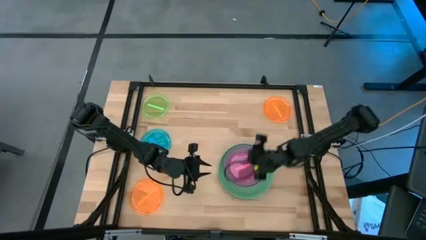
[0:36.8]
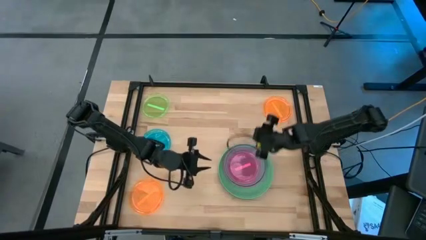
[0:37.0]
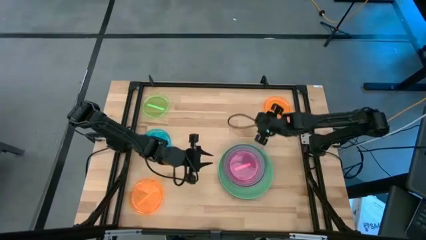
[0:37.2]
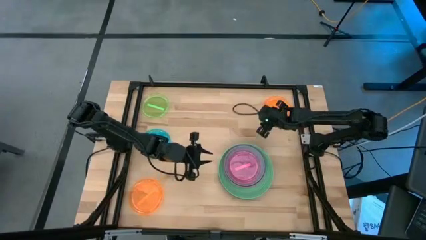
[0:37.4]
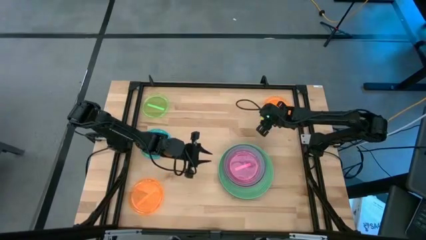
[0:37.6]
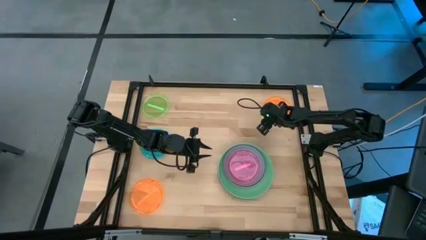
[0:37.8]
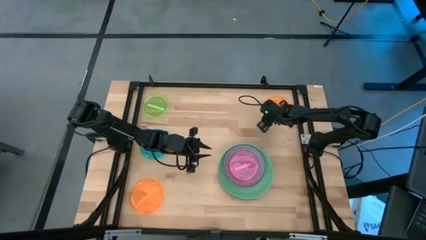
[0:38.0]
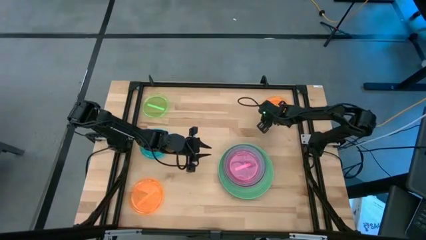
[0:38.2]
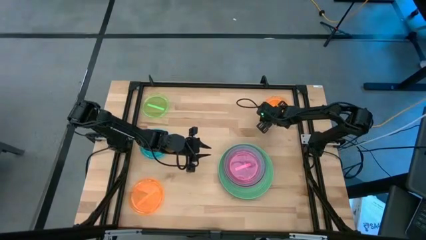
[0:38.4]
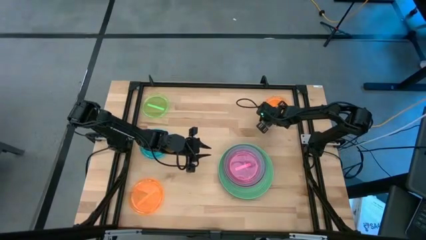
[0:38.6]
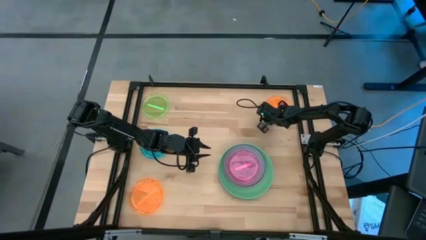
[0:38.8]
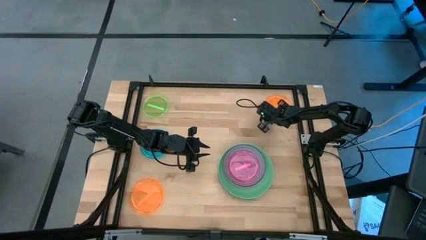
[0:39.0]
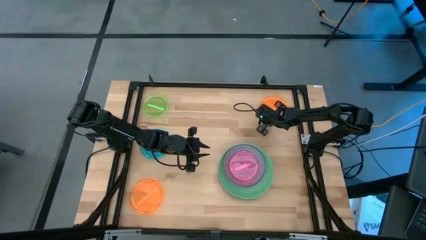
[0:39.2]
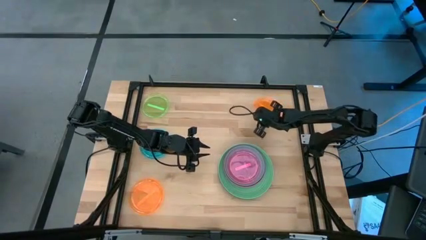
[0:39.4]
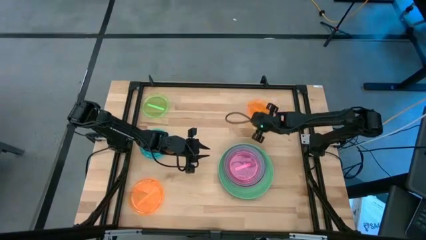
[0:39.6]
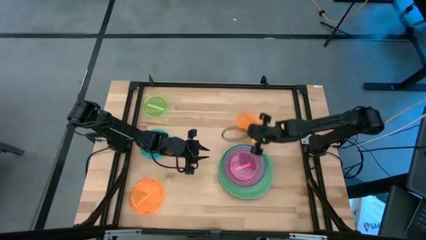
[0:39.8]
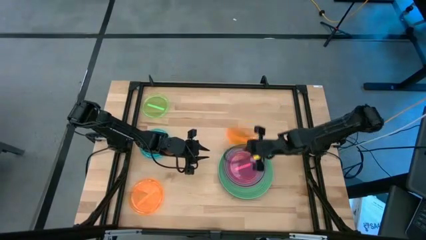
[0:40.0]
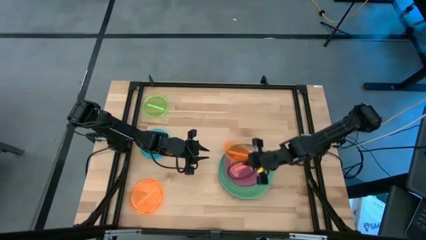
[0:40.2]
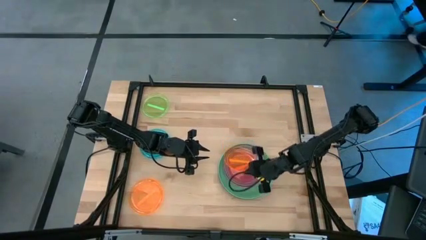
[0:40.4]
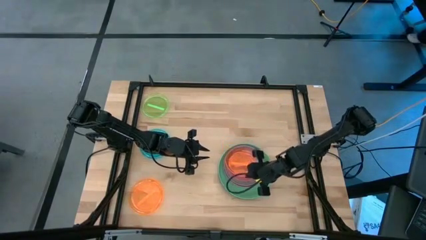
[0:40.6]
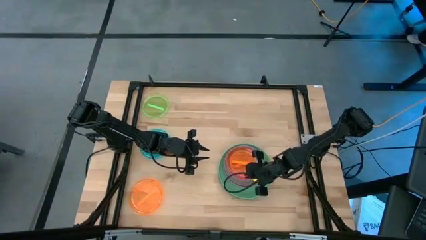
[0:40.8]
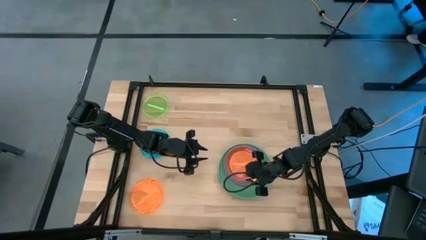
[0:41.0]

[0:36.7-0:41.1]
Task: Stack plastic plates
Stack the light orange plate on the light pink plate

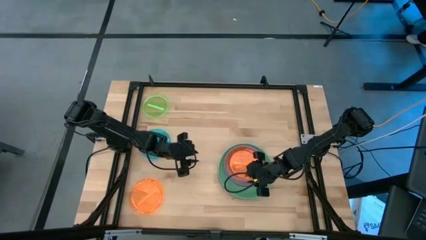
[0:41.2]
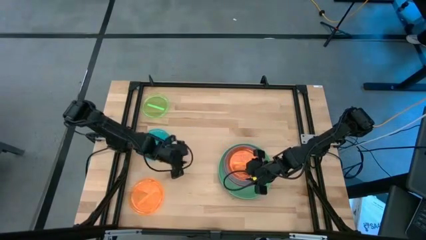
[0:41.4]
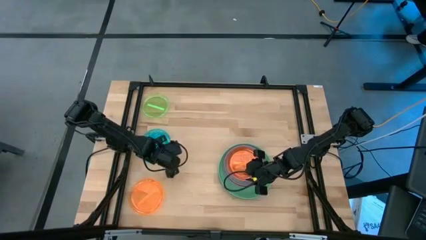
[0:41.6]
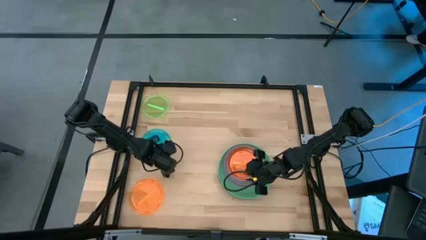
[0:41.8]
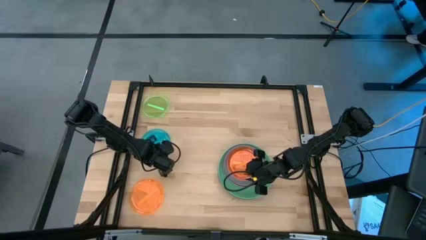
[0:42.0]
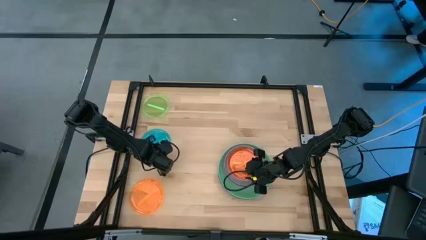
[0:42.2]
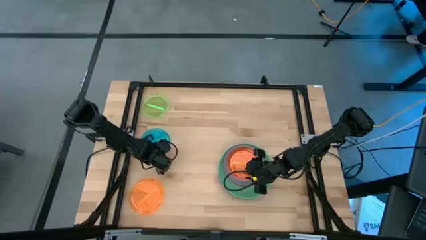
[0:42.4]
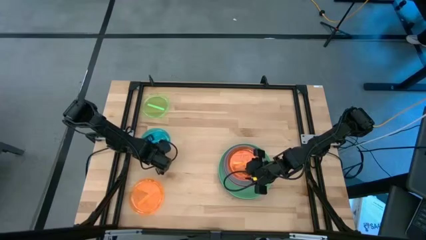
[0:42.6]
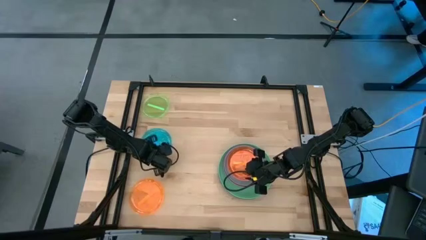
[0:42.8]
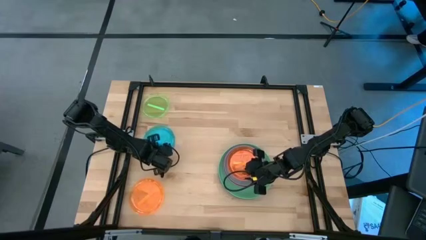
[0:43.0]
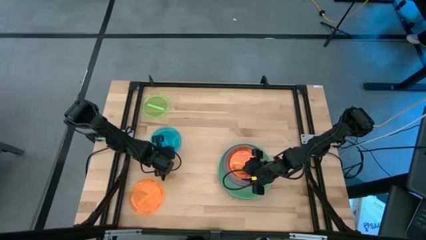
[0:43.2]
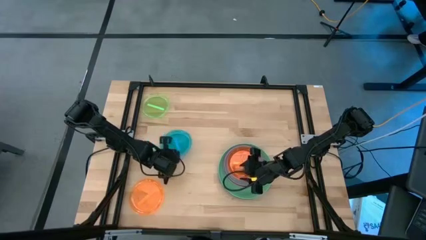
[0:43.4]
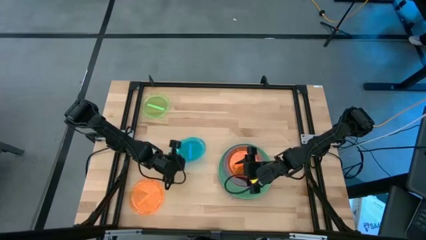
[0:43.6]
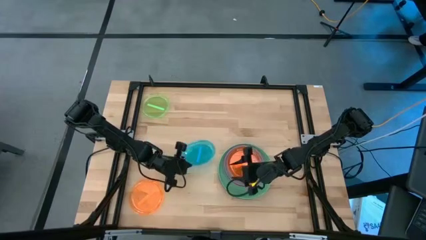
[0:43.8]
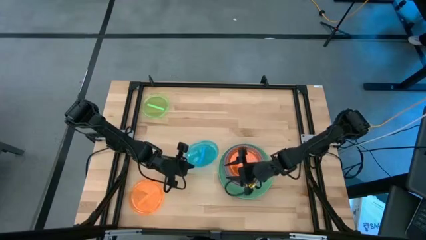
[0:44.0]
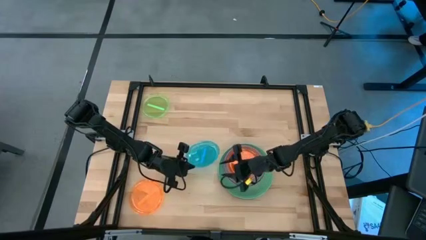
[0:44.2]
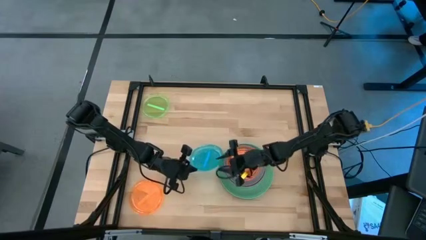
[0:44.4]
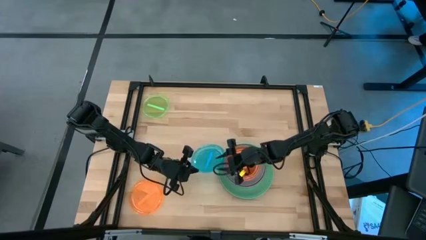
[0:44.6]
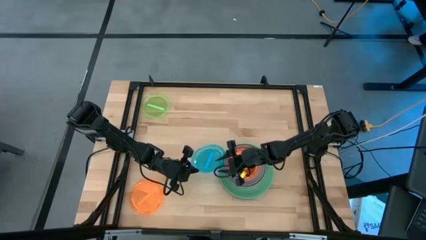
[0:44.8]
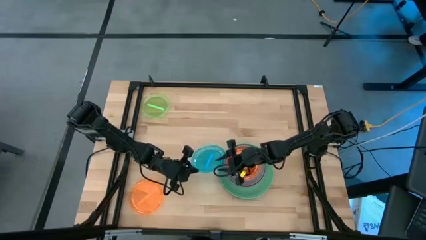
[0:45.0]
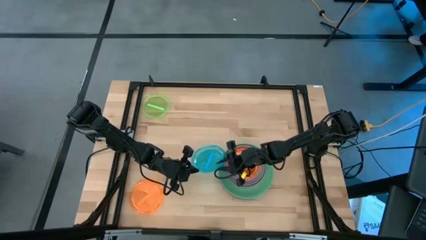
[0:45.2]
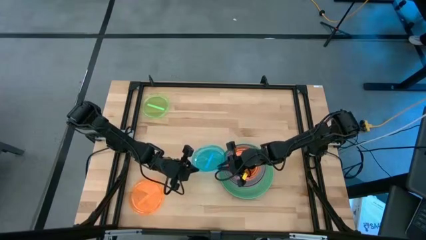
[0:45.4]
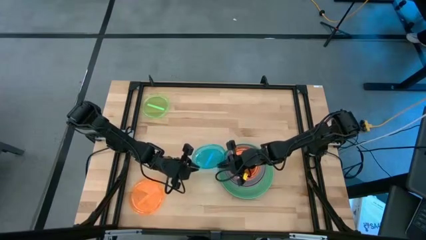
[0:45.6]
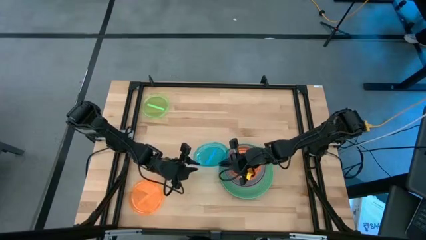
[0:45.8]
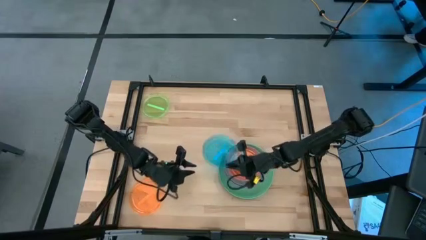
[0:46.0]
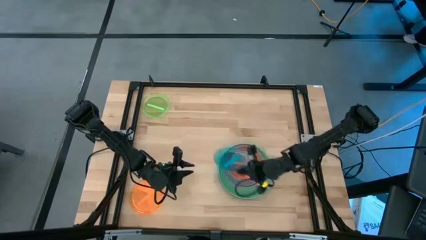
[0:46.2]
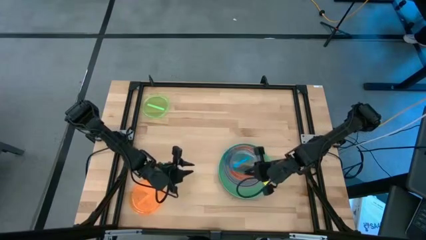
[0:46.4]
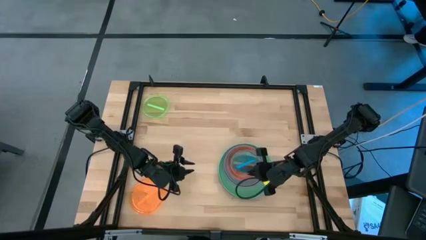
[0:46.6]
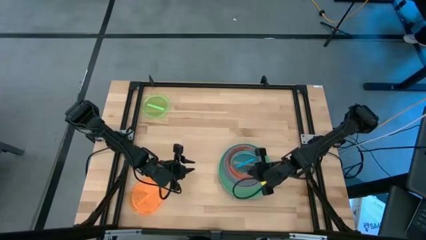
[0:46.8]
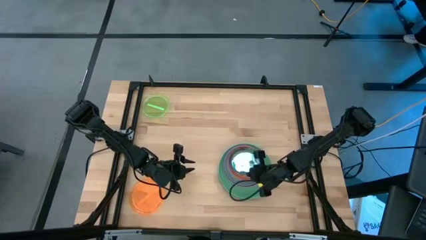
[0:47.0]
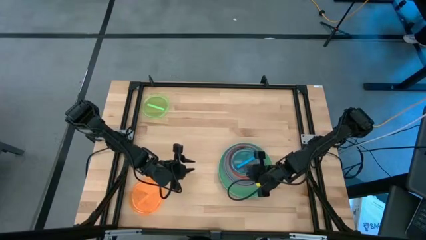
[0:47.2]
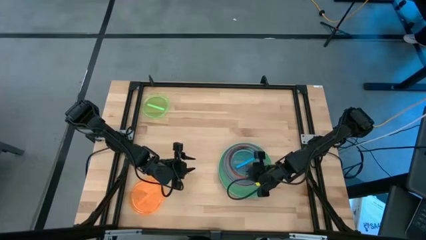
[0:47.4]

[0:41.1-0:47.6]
Stack the light blue plate on the light orange plate

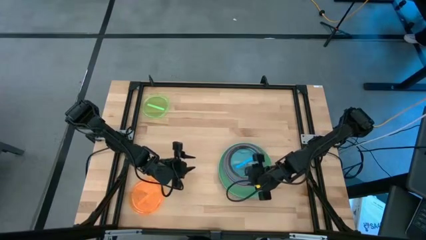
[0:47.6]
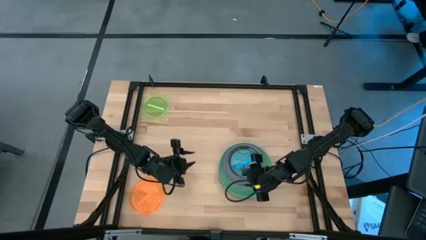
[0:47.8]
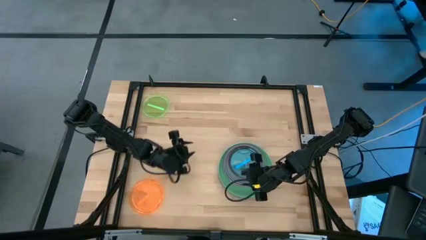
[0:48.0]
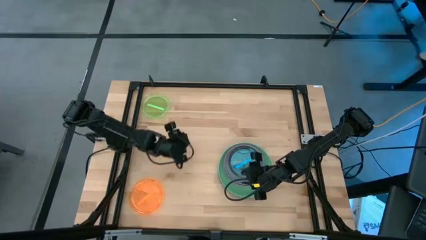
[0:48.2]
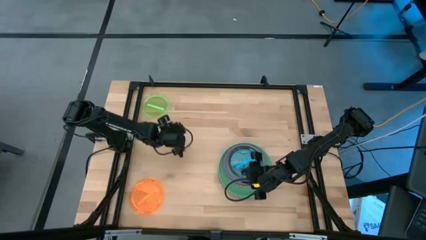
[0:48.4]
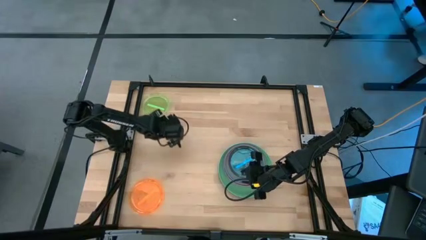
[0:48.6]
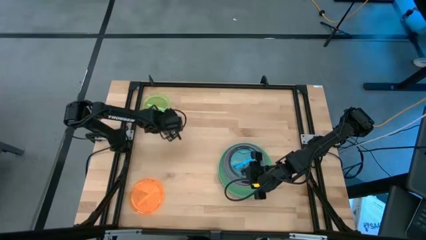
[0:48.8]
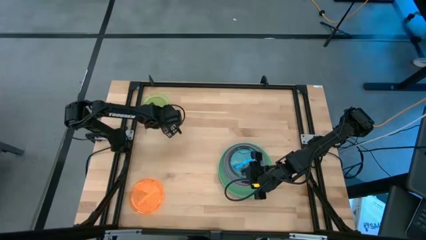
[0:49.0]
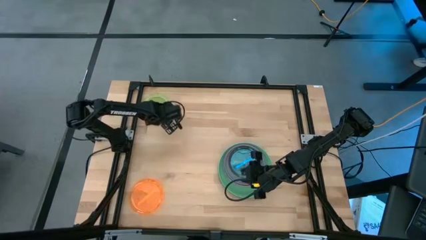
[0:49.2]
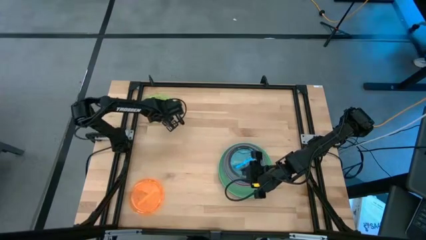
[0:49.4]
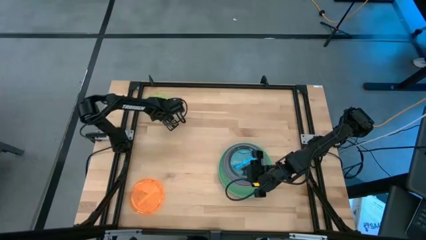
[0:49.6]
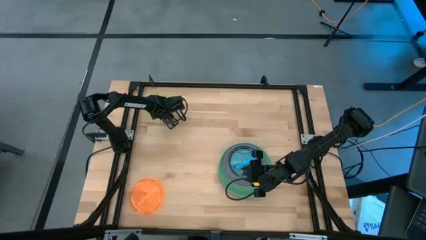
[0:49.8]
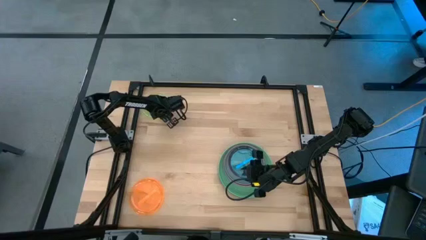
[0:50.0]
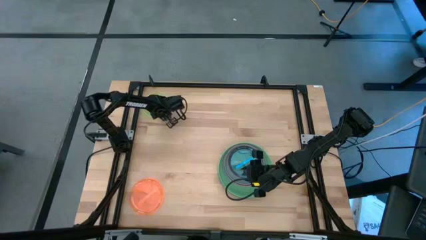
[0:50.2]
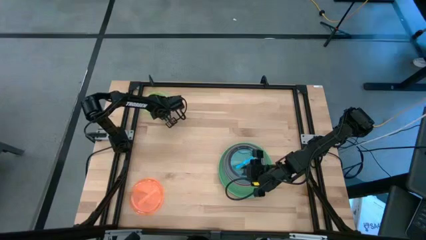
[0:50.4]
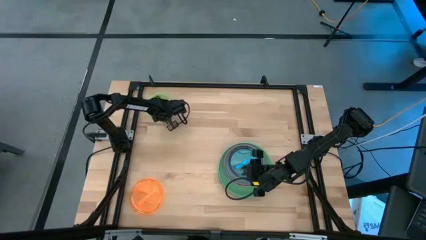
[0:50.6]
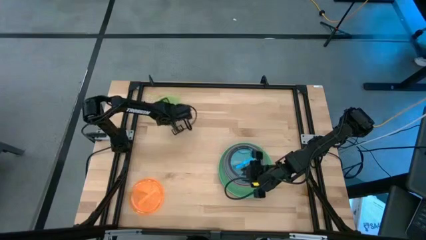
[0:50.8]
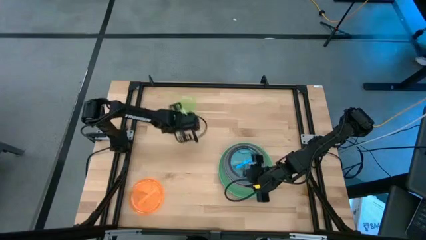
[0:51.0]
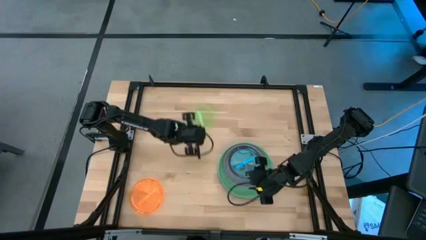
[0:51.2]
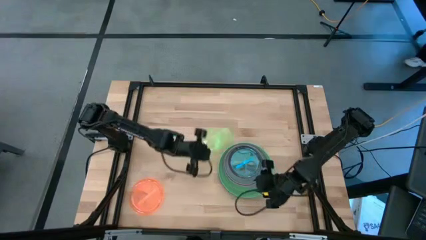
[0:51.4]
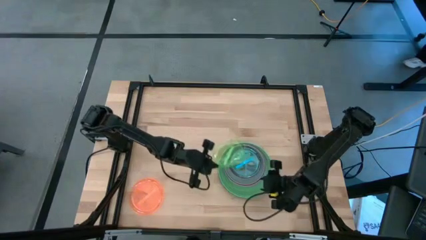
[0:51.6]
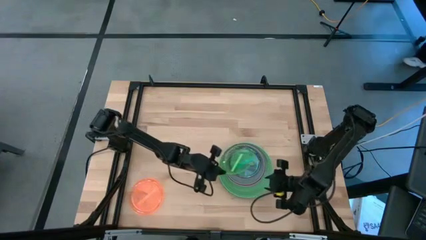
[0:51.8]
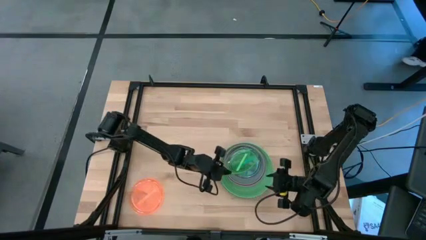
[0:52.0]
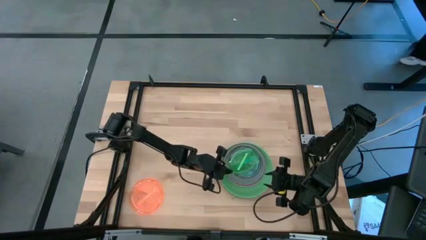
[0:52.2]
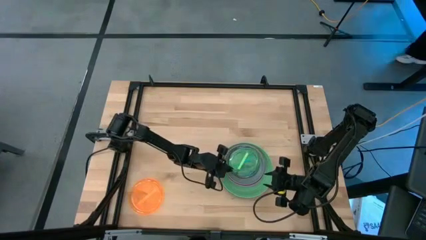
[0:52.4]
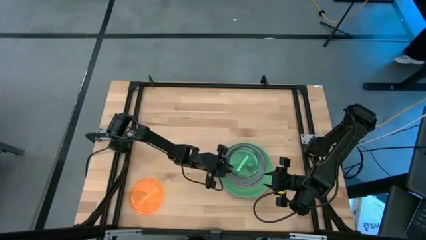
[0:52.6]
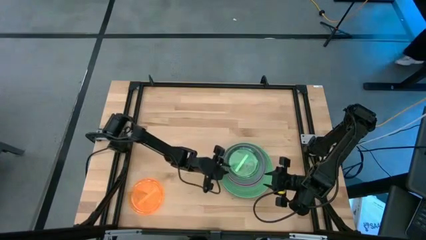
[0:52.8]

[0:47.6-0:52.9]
Stack the light green plate on the light blue plate
